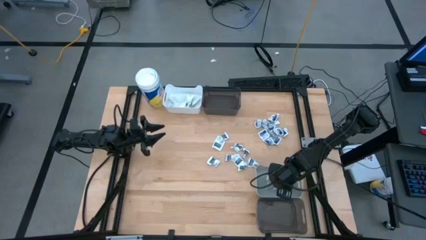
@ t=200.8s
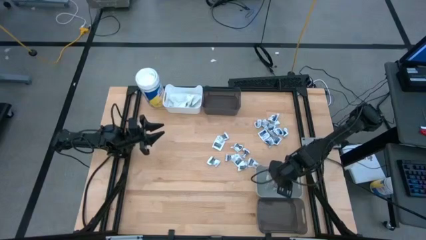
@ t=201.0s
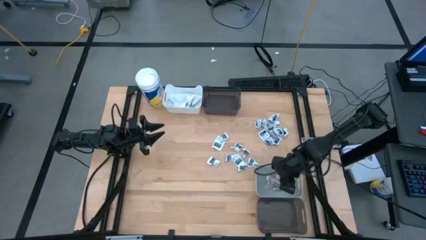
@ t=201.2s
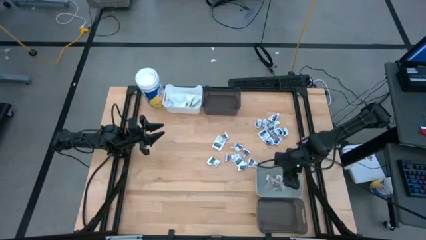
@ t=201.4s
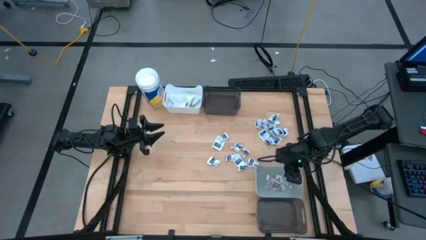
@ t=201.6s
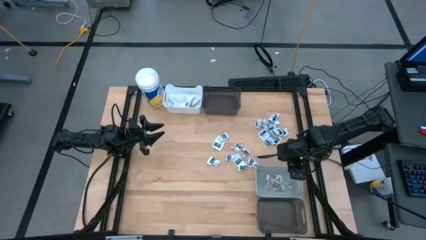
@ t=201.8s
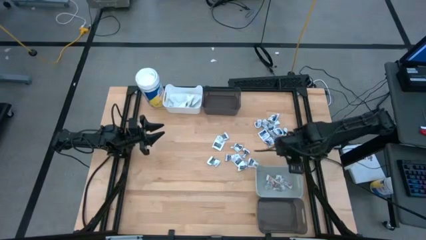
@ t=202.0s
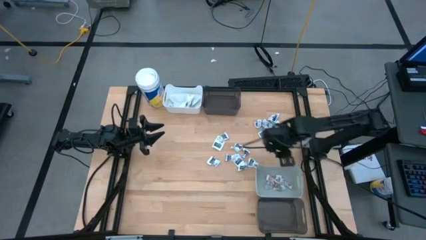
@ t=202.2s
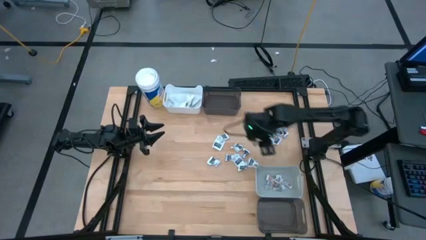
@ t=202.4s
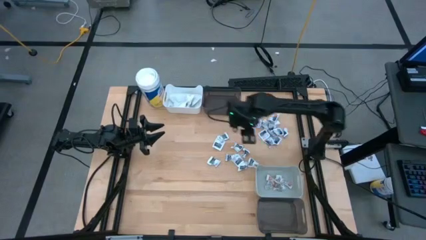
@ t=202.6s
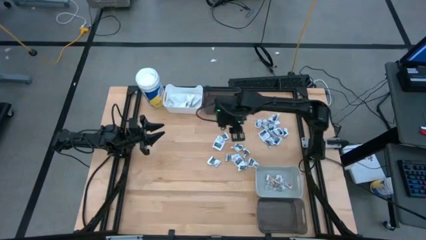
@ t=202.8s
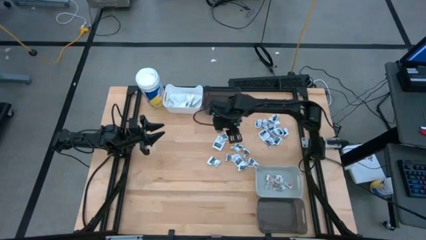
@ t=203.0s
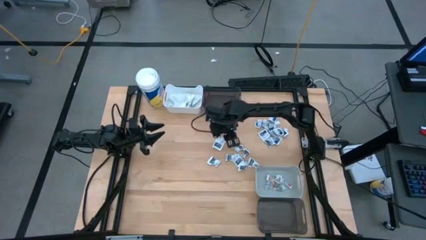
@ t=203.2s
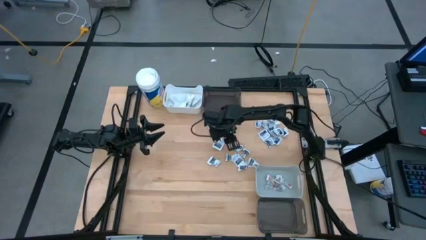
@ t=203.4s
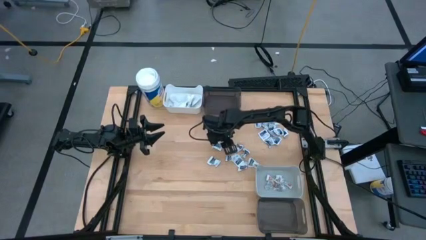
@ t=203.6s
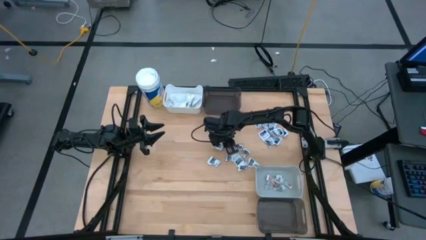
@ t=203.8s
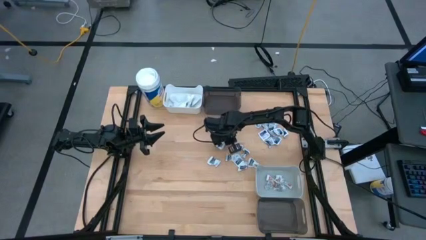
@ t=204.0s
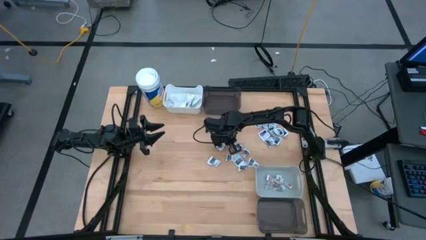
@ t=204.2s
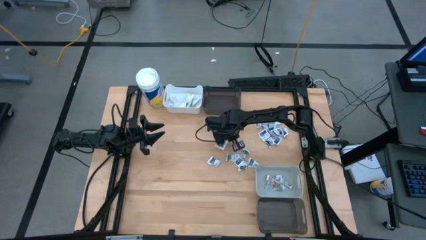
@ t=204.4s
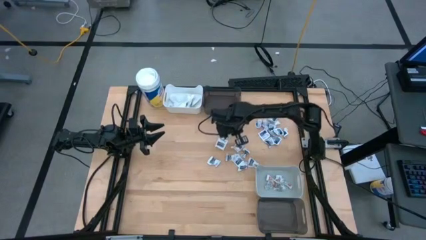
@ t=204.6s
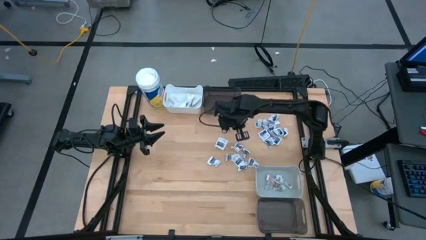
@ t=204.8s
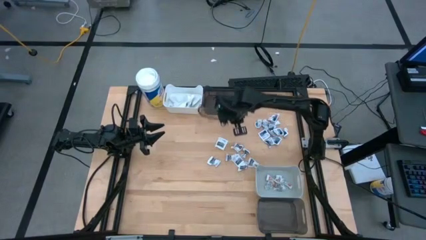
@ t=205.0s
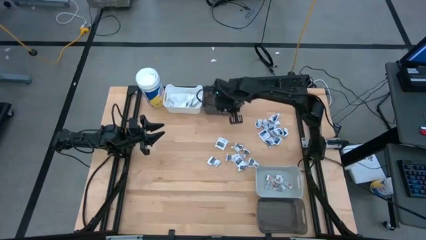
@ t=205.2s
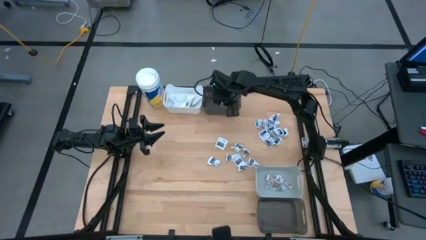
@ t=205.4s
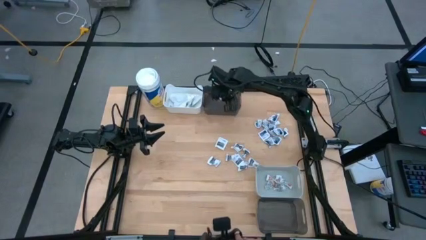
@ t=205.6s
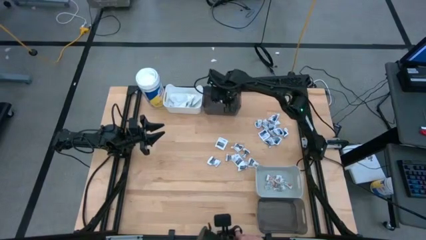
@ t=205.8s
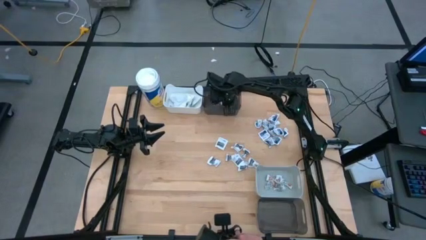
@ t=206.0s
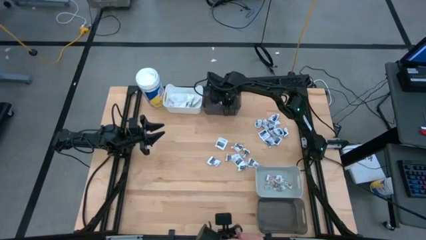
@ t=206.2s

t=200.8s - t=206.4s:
Task: Pick & Place First Aid Supplies
Put the gray towelette pack into the top black bin

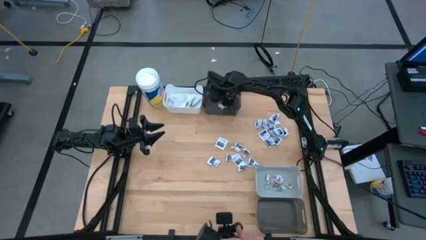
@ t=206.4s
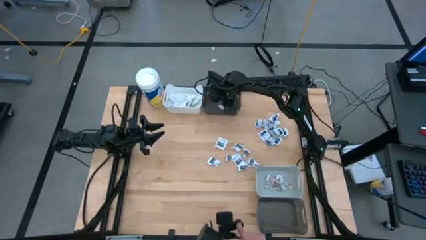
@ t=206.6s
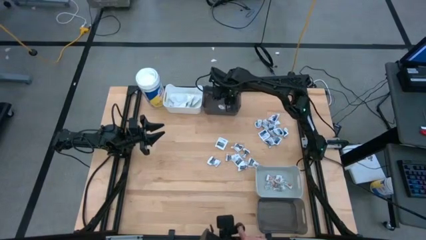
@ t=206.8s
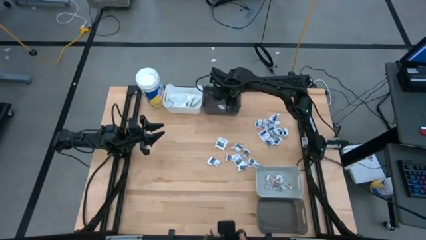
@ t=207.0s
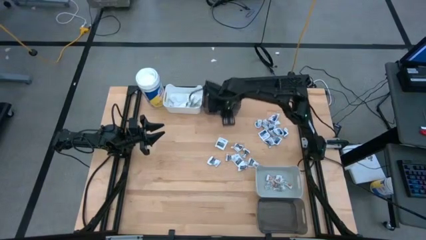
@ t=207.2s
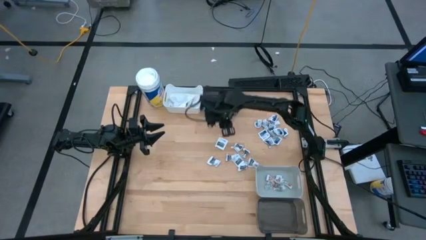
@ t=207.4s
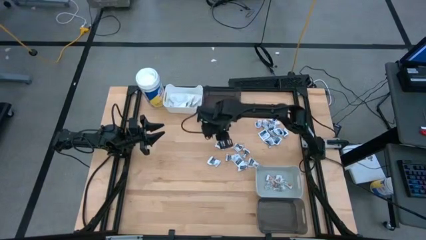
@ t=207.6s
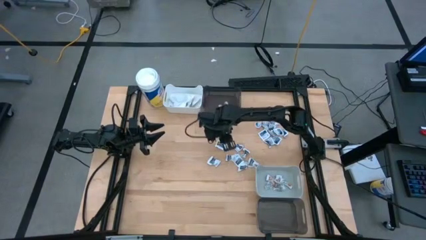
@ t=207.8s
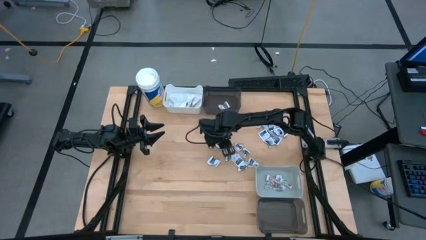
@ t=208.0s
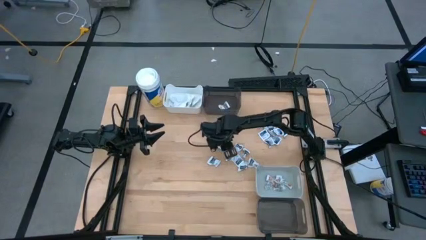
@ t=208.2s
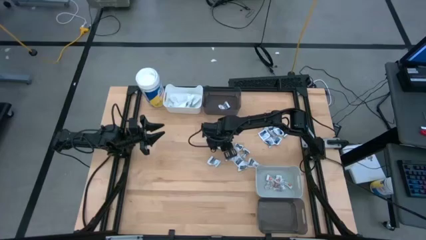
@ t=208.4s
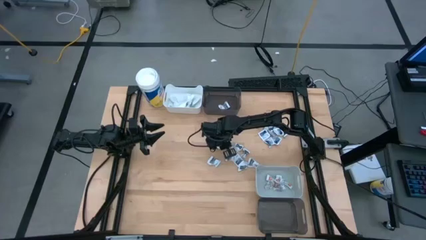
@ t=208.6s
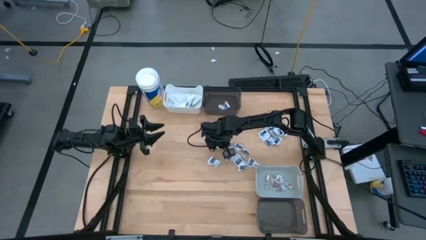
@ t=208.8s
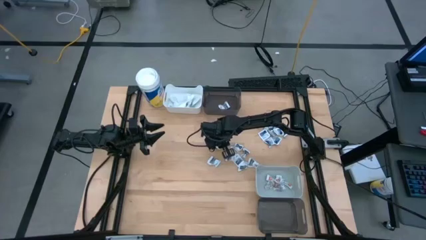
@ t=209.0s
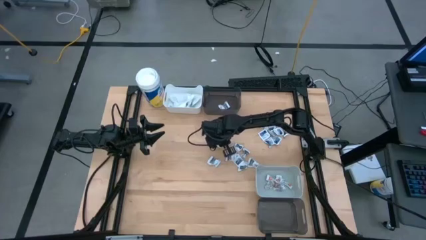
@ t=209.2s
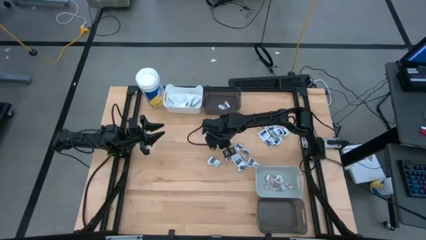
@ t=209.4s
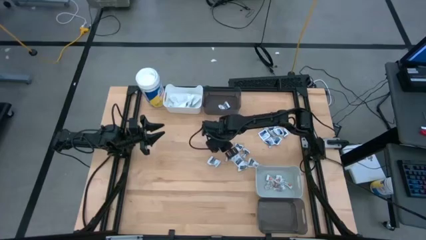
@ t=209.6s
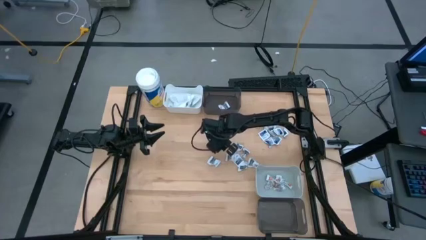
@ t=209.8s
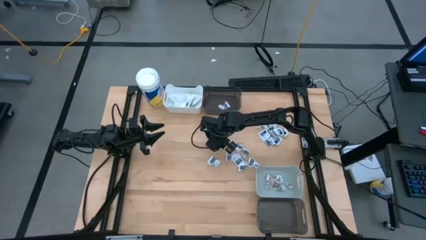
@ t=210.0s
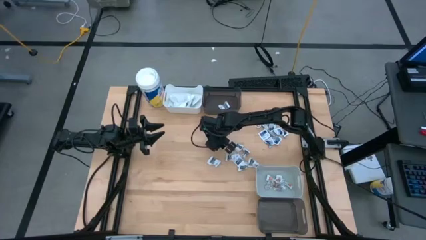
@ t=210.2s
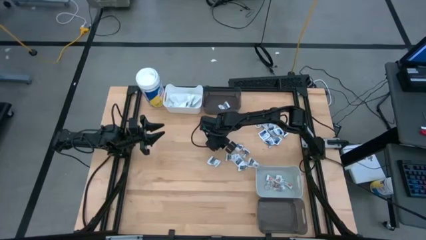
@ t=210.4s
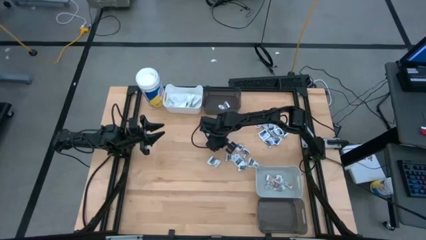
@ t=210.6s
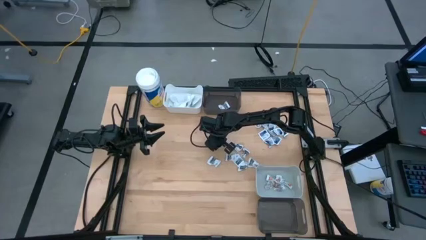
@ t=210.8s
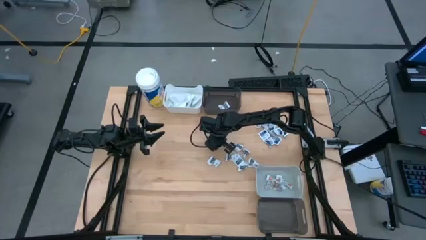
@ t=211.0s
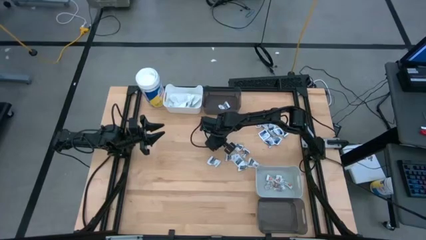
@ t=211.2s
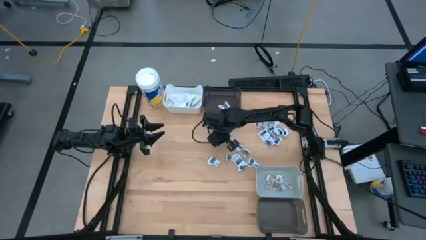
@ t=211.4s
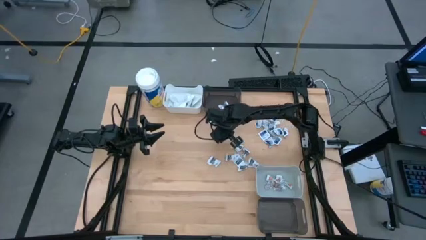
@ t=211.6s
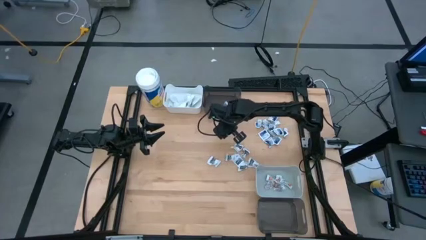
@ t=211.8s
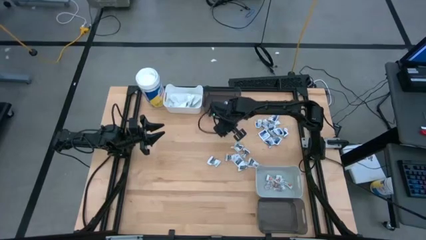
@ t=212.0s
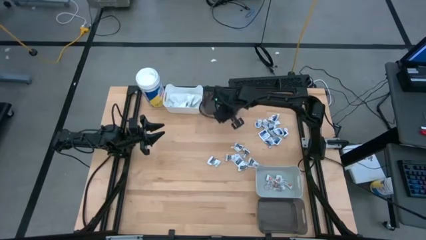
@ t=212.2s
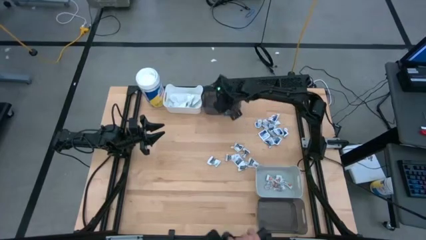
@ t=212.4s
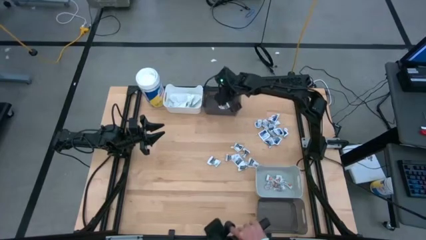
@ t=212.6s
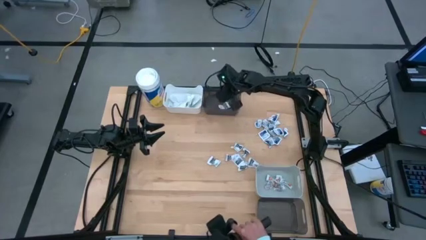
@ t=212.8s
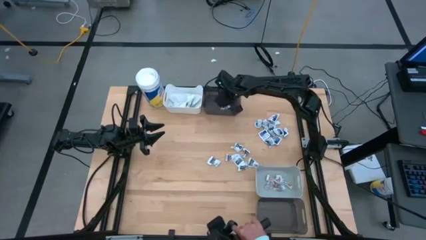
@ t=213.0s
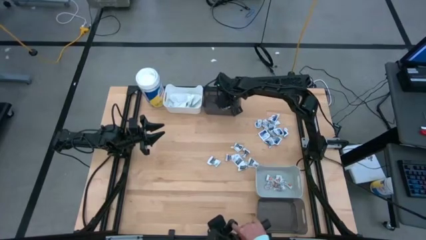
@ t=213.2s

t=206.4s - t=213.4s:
Put the gray towelette pack into the top black bin

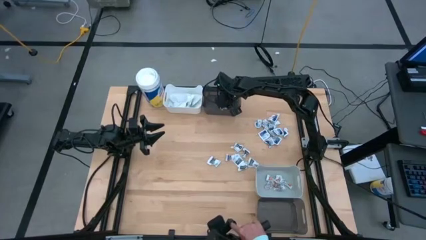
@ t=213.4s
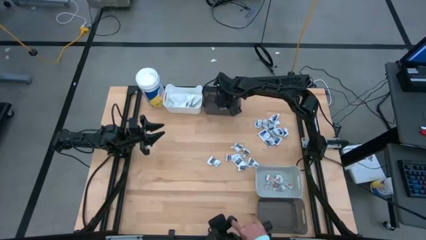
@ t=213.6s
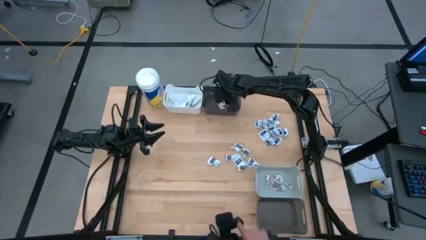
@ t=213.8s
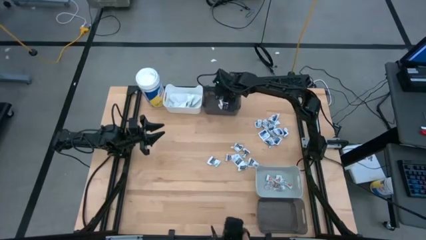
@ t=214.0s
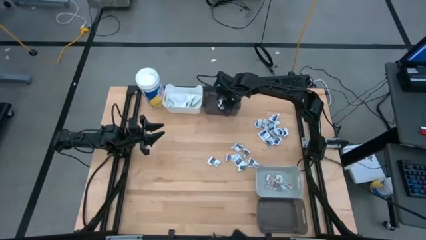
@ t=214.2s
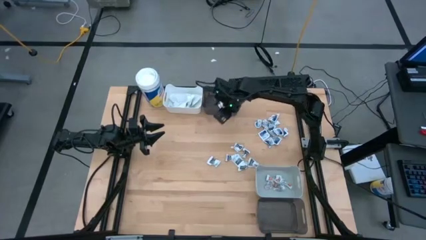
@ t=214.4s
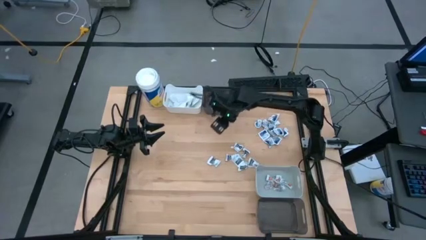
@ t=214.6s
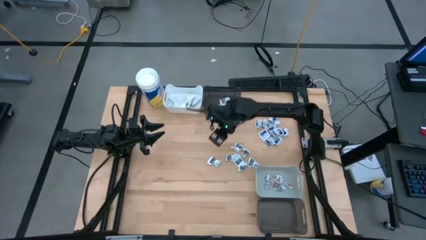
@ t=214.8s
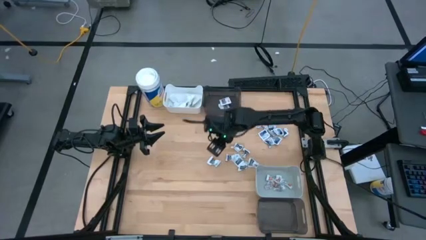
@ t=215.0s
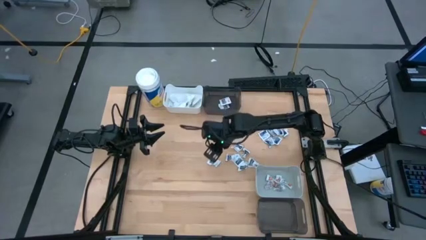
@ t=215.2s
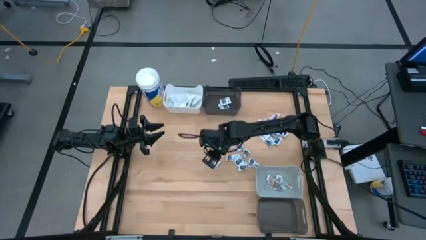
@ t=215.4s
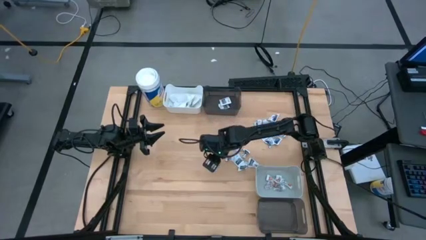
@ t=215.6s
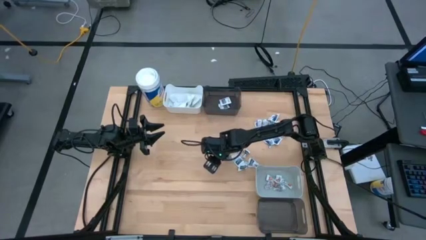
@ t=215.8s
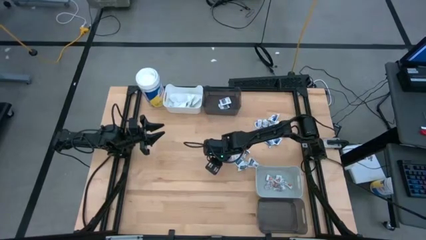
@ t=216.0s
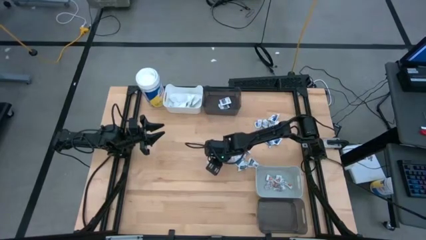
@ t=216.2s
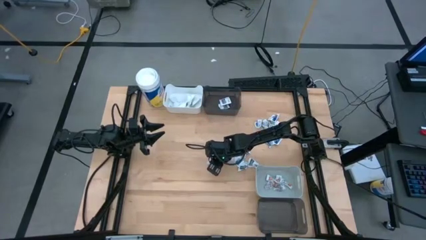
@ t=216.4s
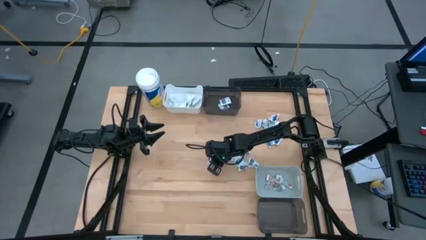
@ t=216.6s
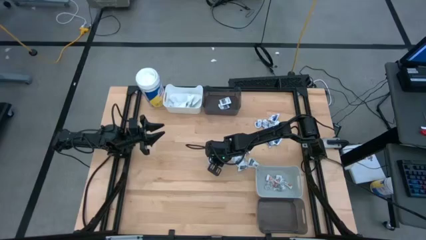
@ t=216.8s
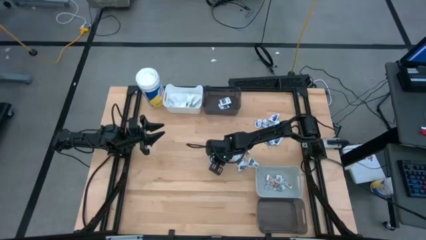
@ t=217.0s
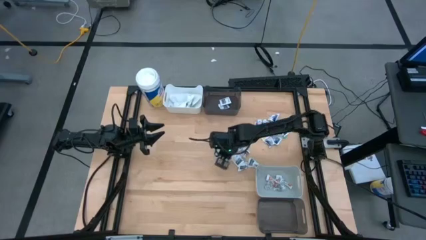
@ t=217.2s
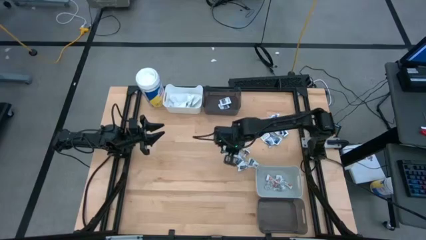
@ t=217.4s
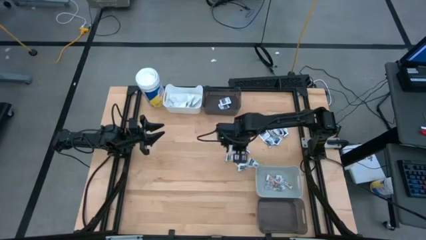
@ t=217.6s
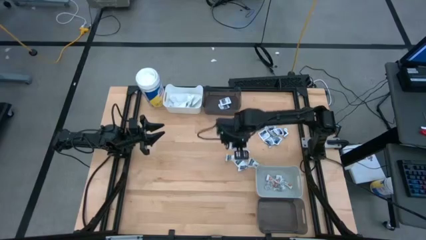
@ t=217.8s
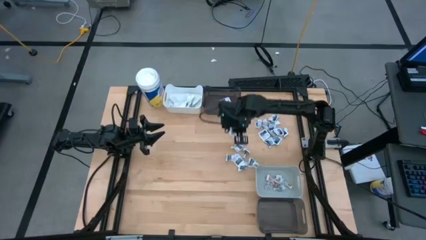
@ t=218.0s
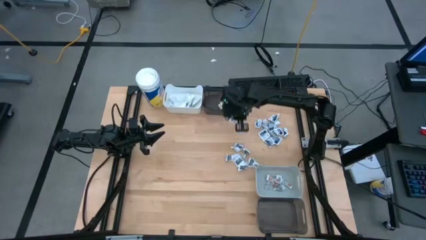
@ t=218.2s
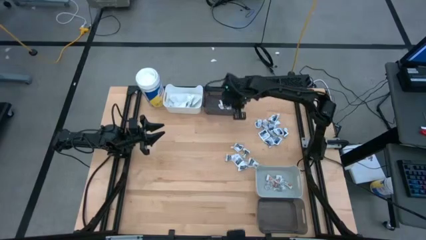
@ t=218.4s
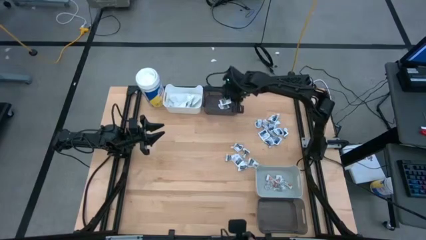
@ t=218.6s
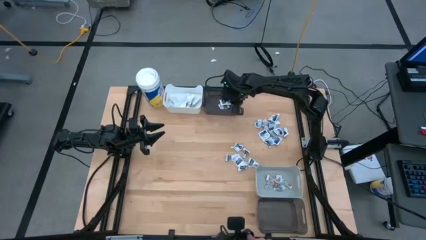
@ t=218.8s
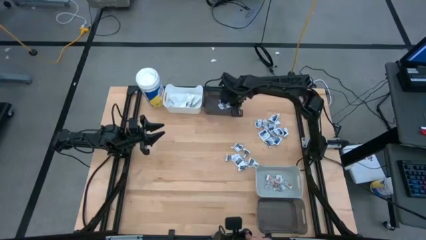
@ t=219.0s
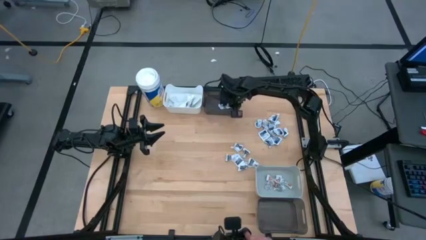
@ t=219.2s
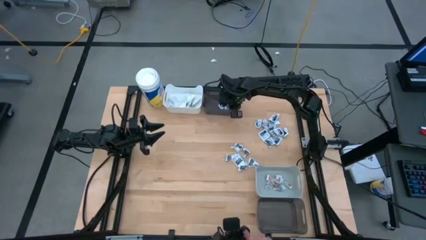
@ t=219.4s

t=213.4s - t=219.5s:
Put the gray towelette pack into the top black bin
